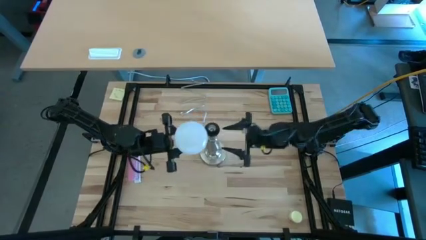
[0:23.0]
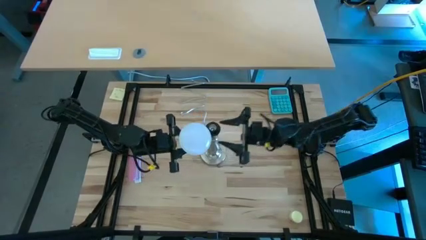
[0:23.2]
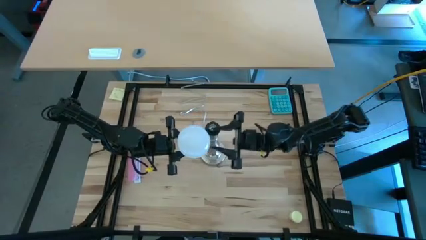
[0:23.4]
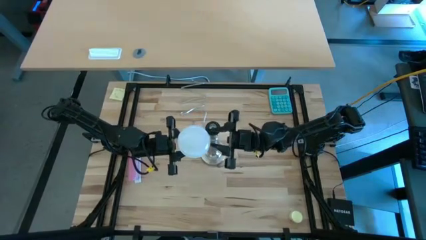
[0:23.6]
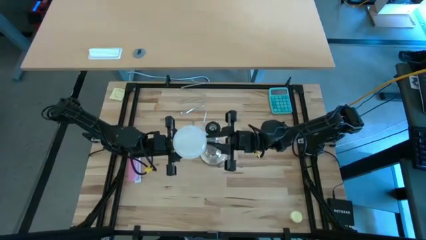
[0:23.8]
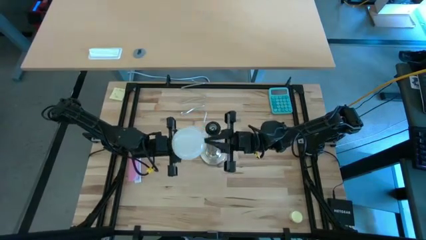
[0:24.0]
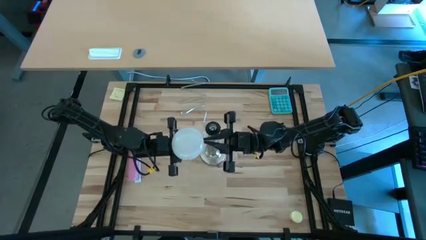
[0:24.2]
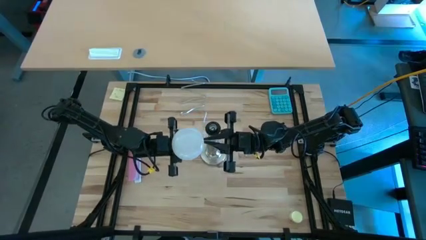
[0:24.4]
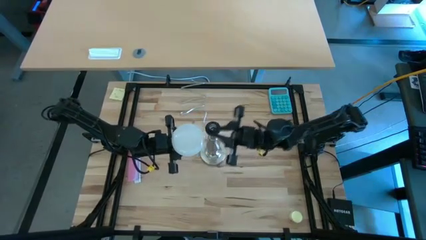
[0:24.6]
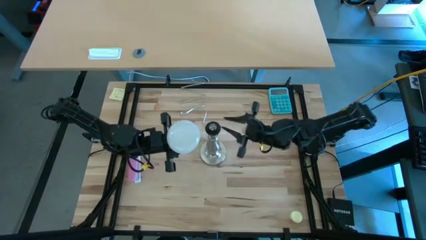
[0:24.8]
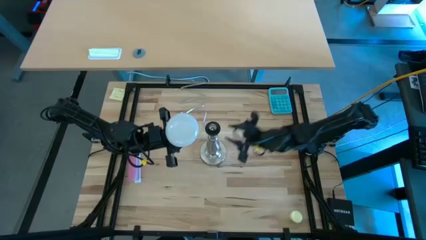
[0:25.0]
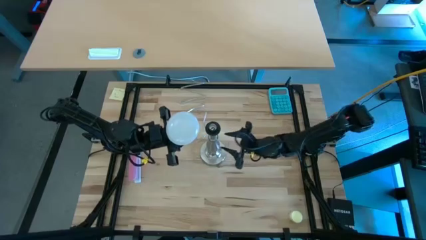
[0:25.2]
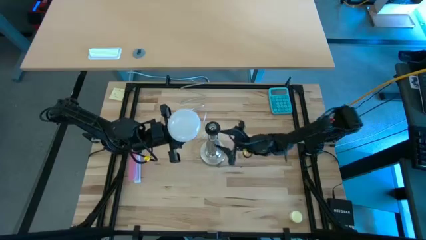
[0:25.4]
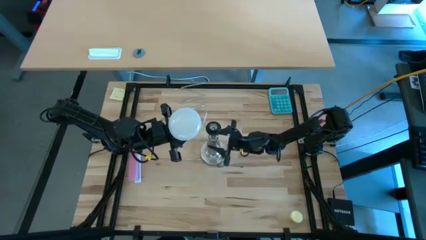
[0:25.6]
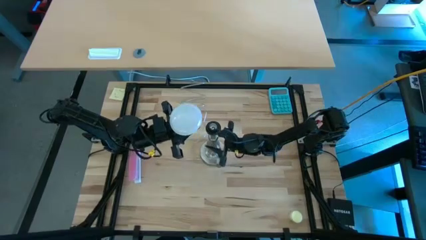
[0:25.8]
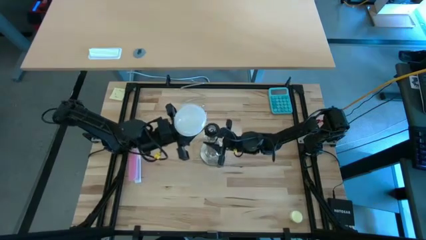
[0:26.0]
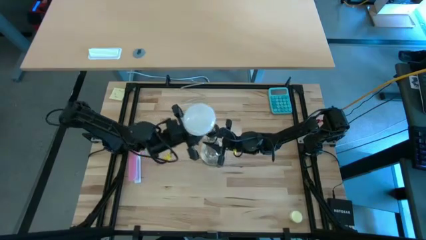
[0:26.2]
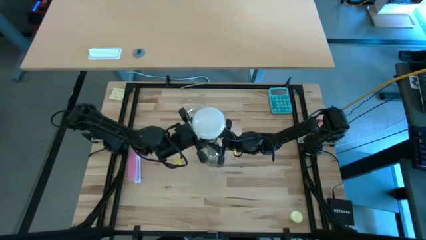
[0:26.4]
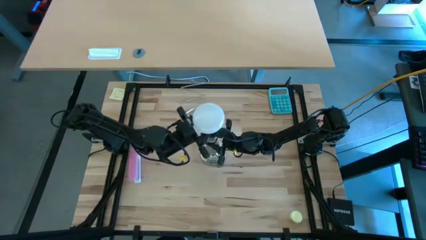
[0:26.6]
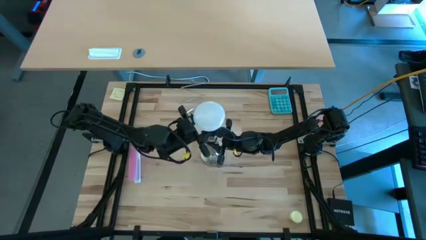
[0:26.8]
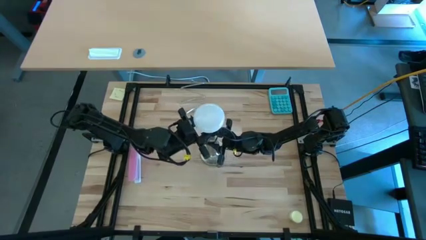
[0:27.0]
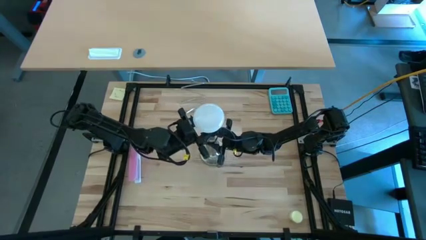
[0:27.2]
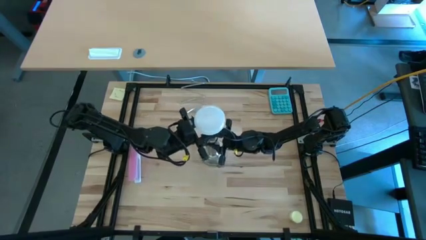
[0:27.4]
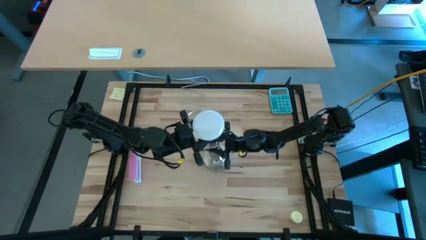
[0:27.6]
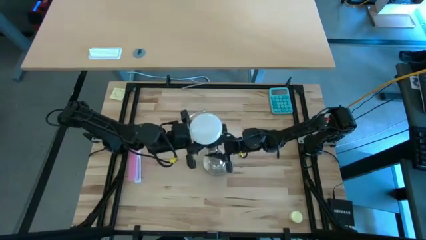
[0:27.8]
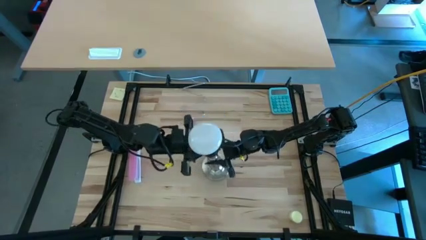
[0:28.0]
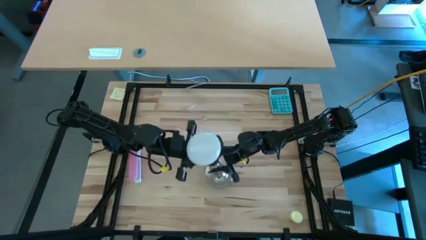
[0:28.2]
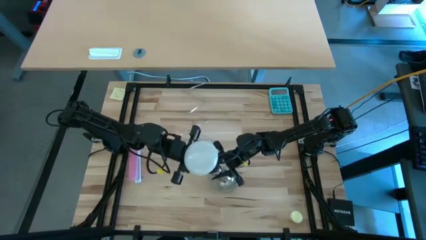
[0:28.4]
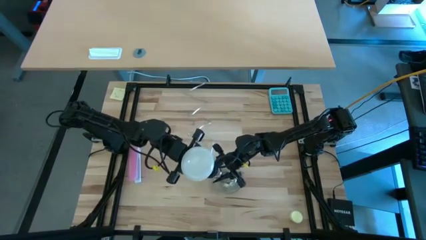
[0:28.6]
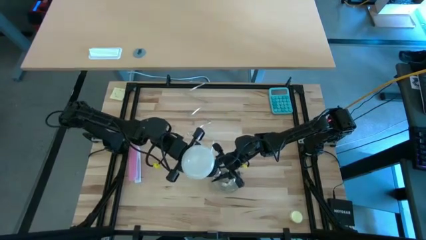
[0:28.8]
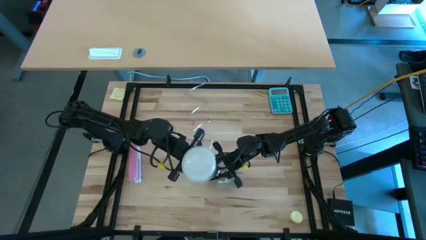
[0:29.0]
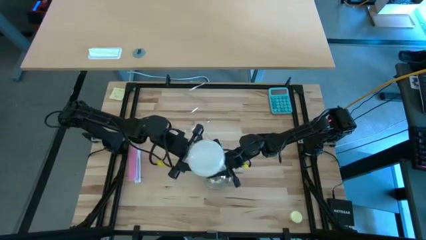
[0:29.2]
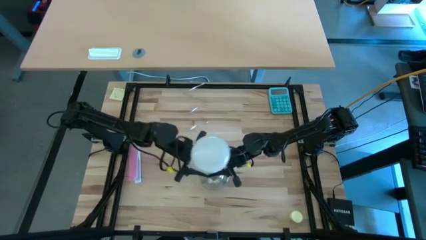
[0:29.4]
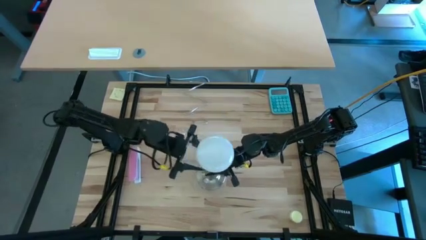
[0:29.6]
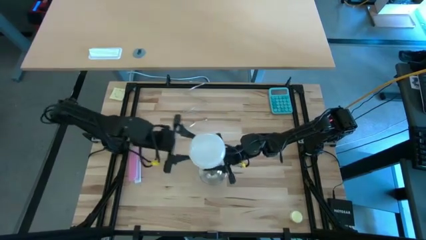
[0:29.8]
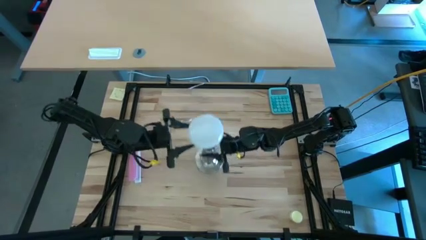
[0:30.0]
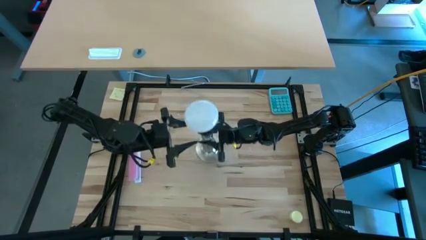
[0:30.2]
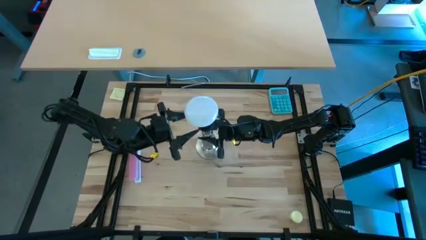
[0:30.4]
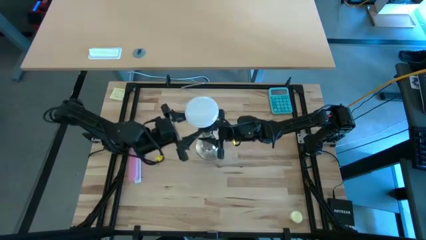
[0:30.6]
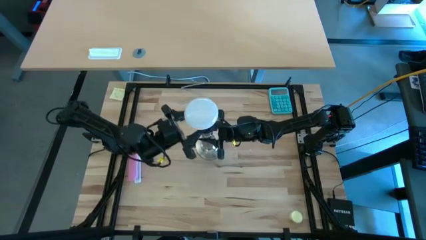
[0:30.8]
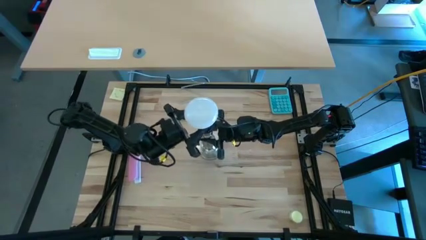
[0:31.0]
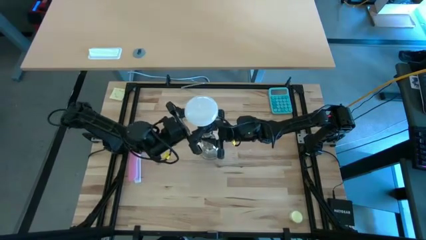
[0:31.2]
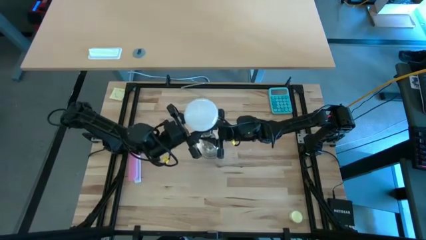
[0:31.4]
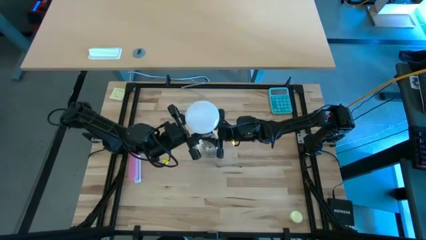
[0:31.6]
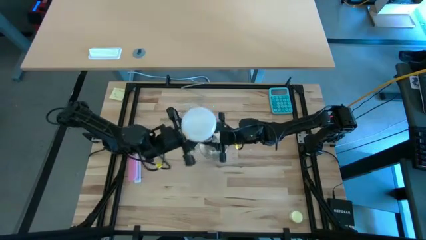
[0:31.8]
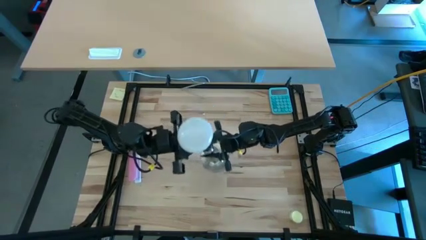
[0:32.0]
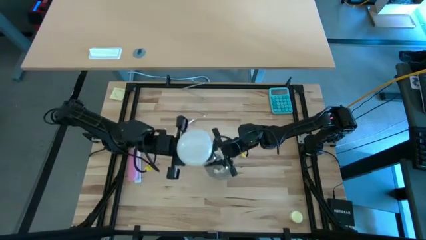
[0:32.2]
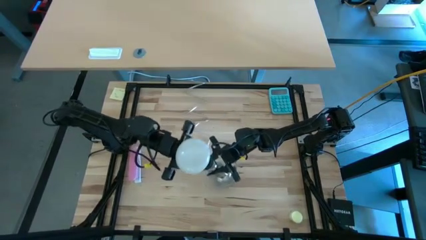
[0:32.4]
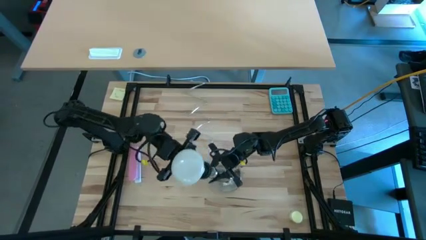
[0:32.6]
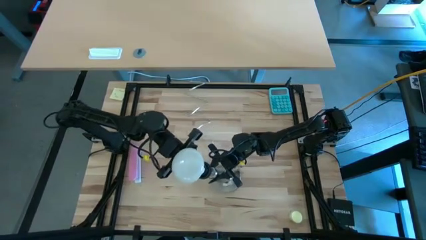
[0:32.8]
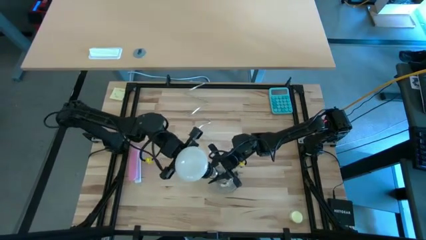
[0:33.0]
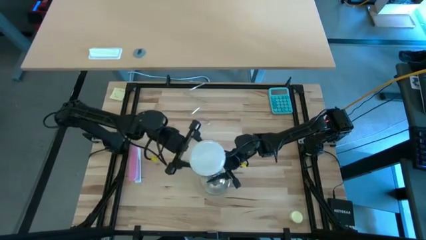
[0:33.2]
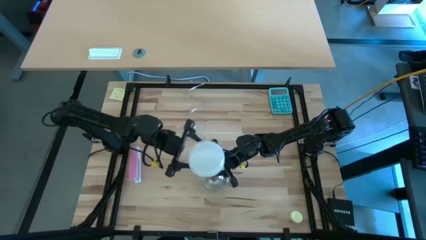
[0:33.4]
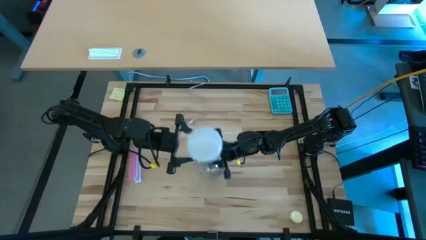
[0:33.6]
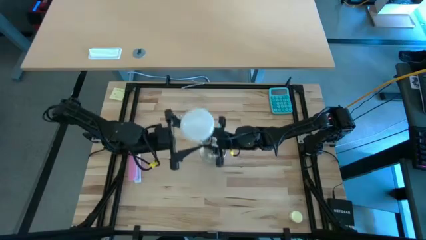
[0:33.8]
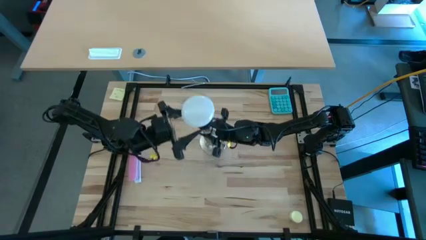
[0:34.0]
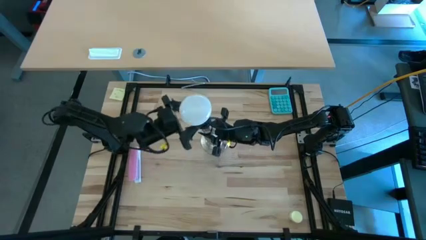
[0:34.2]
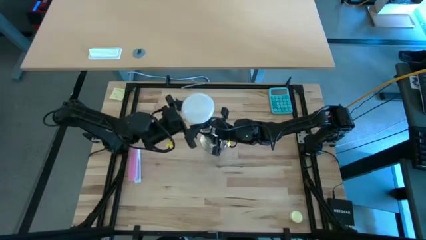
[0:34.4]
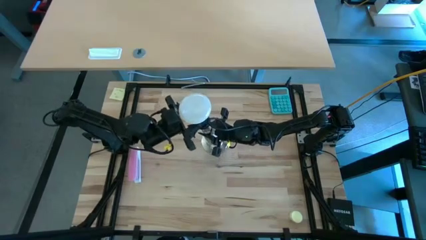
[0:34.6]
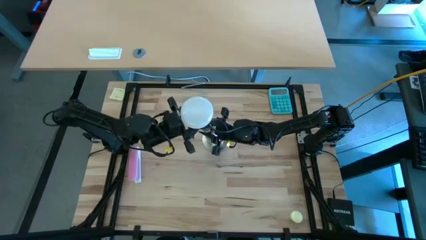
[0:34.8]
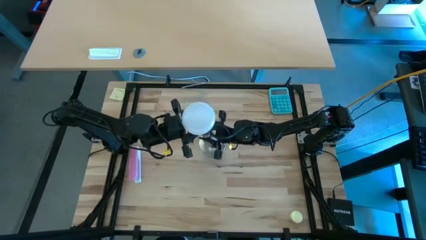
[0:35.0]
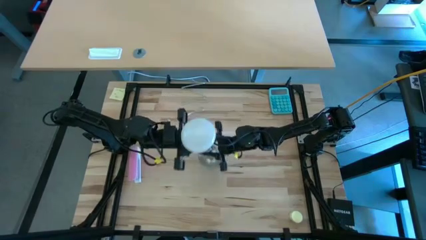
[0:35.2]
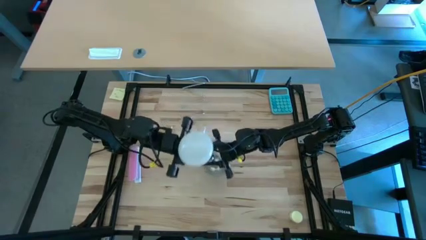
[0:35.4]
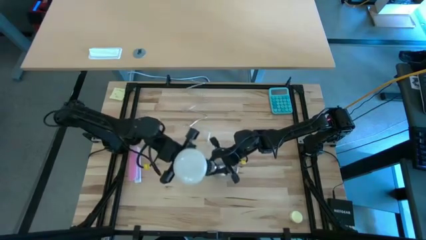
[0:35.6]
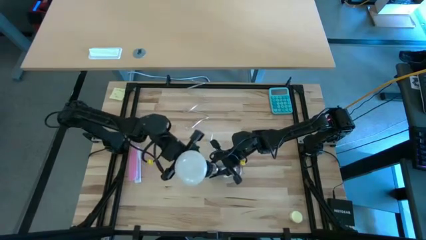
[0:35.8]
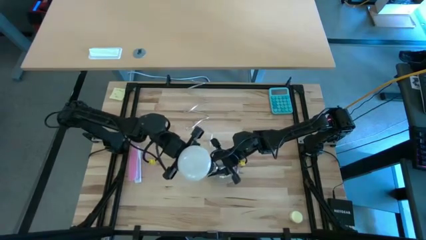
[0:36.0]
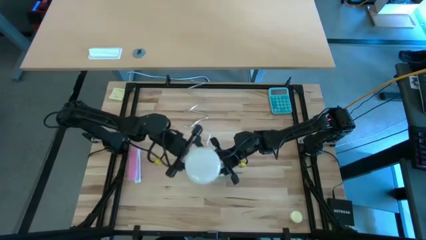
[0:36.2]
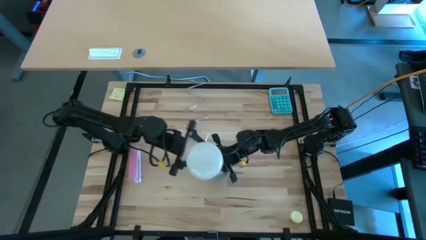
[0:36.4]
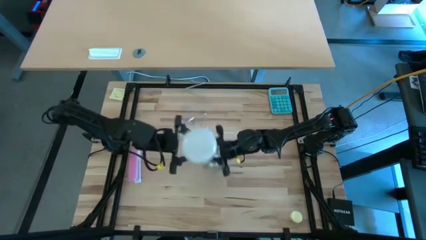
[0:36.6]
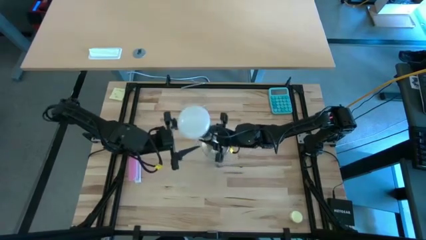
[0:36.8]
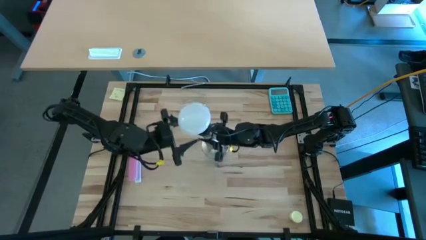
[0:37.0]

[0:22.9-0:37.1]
Task: Screw lightbulb
Insert the white lightbulb on the silver lamp
